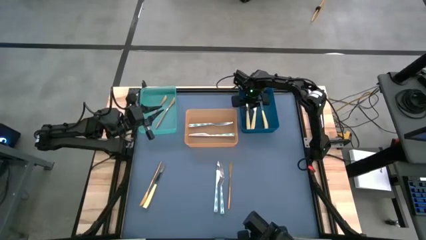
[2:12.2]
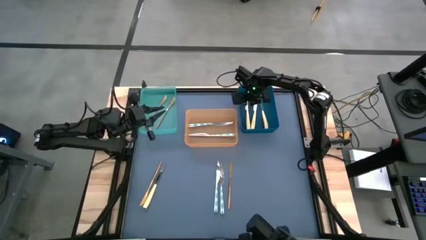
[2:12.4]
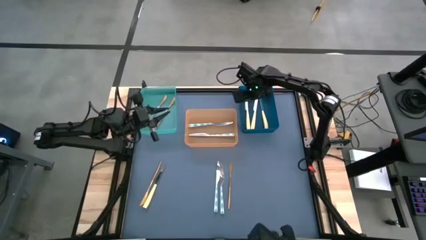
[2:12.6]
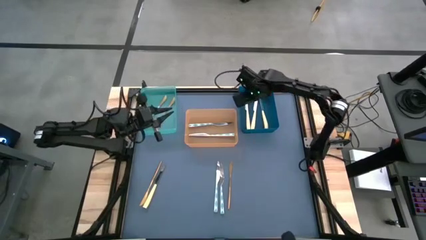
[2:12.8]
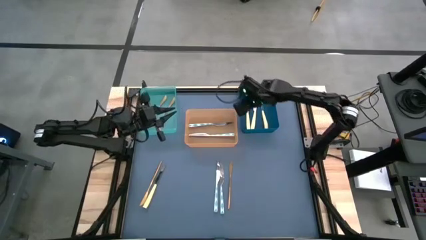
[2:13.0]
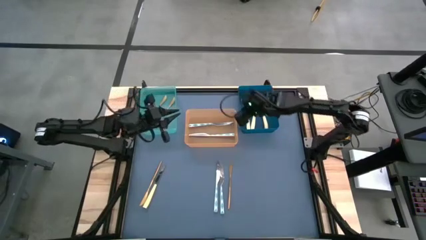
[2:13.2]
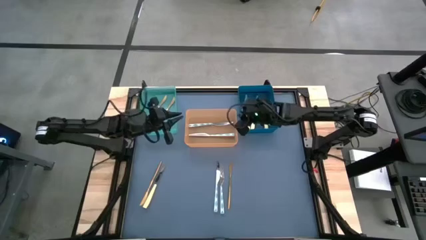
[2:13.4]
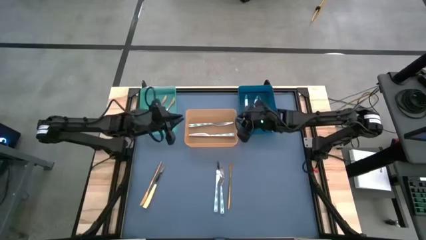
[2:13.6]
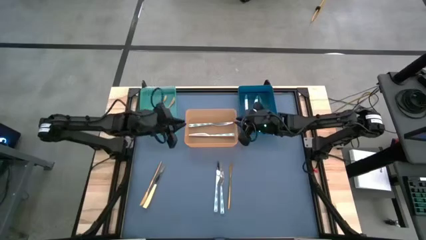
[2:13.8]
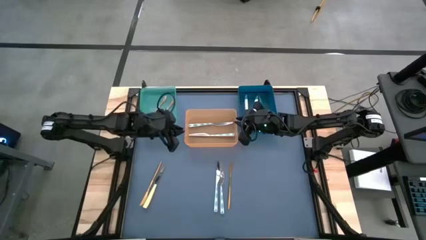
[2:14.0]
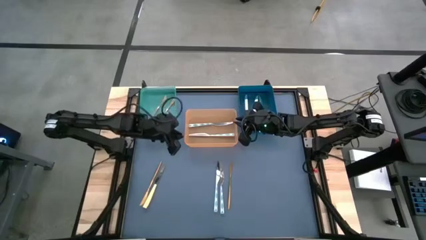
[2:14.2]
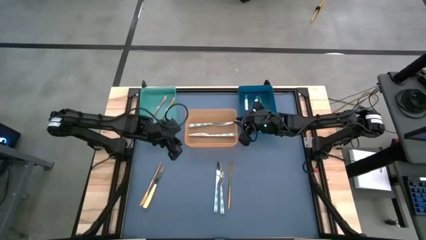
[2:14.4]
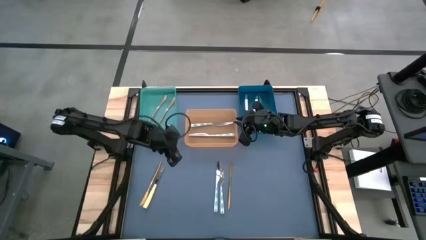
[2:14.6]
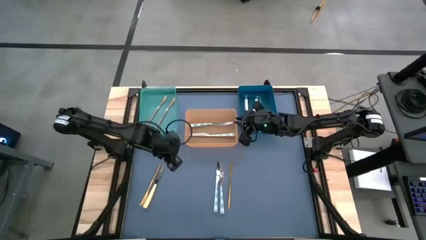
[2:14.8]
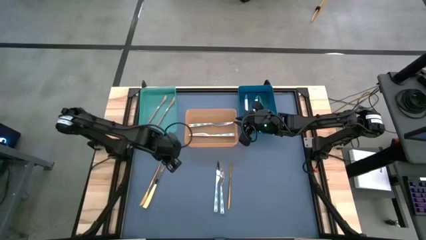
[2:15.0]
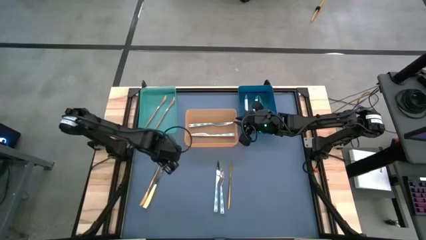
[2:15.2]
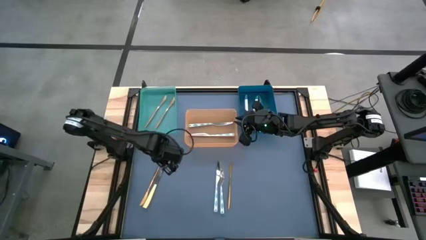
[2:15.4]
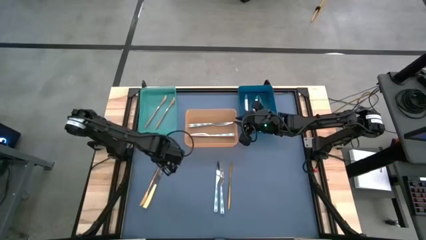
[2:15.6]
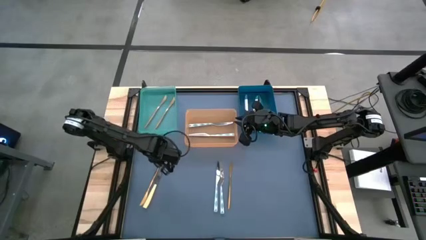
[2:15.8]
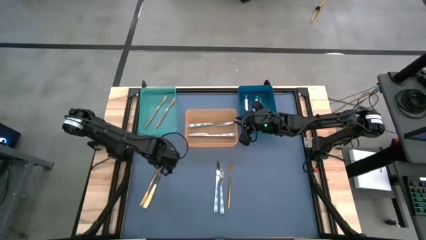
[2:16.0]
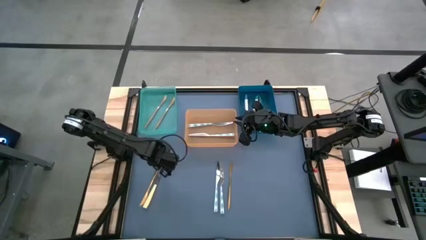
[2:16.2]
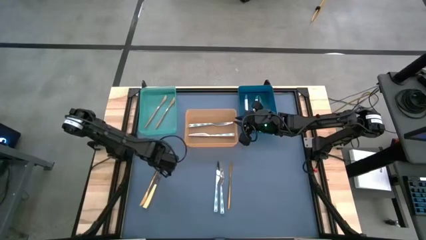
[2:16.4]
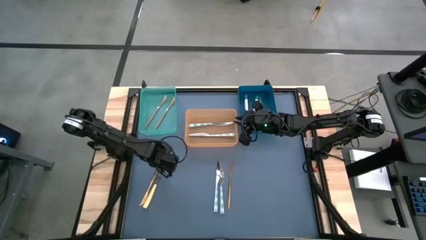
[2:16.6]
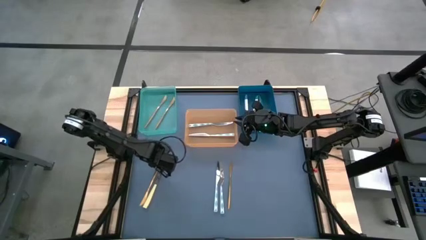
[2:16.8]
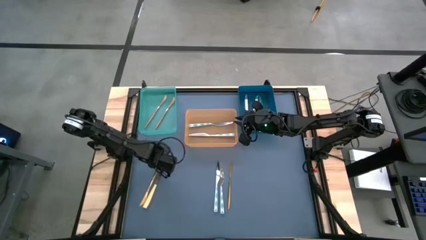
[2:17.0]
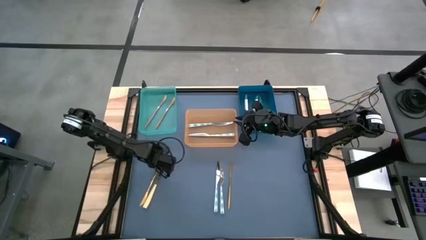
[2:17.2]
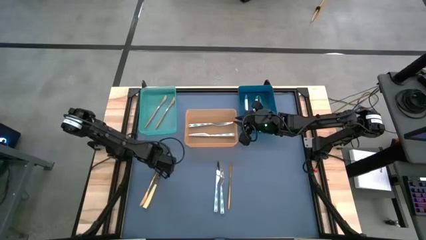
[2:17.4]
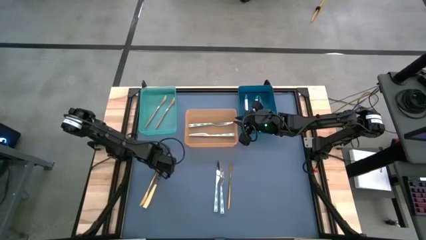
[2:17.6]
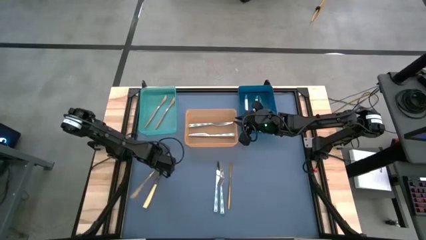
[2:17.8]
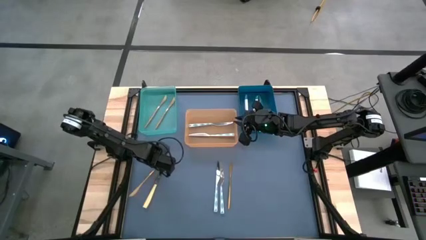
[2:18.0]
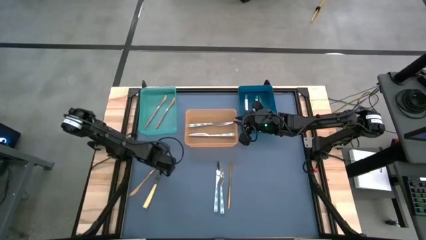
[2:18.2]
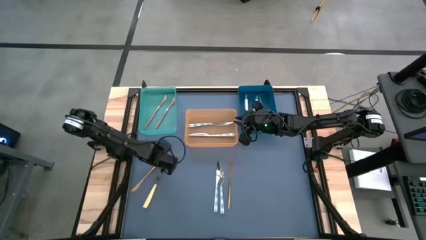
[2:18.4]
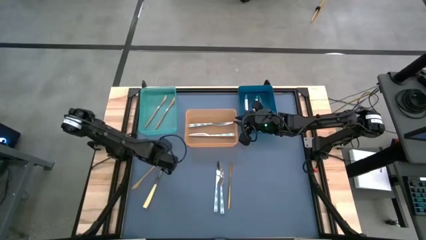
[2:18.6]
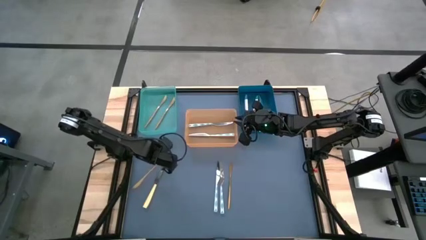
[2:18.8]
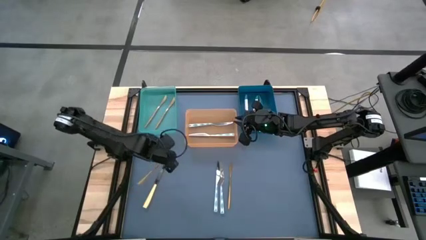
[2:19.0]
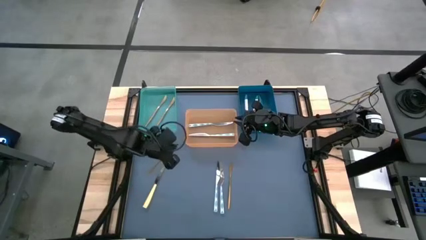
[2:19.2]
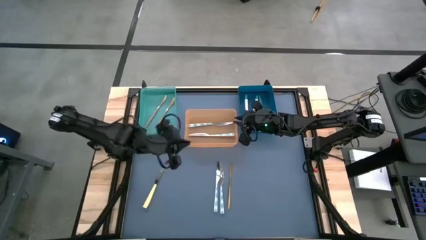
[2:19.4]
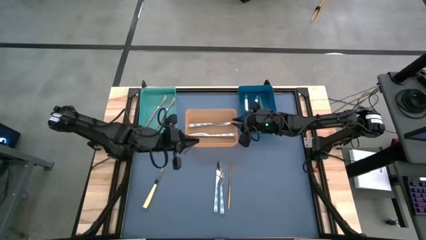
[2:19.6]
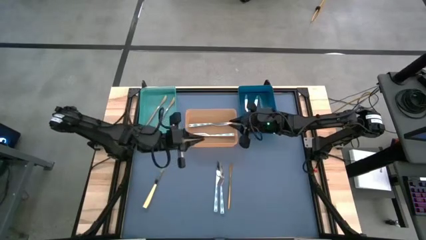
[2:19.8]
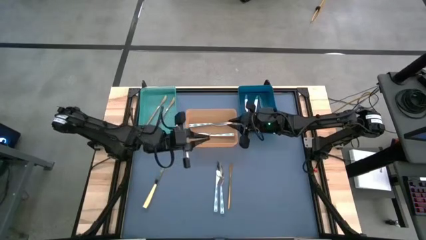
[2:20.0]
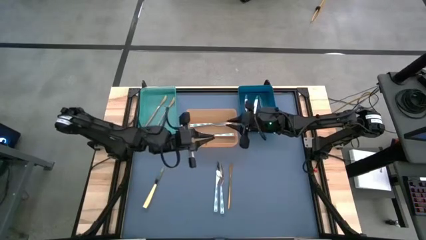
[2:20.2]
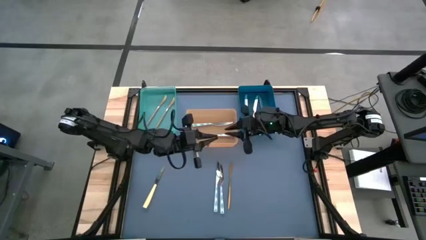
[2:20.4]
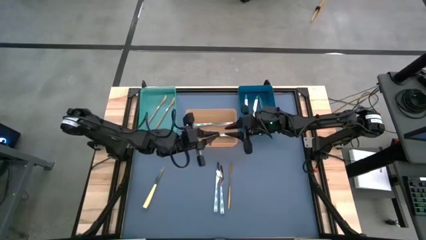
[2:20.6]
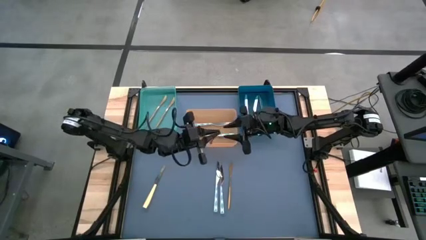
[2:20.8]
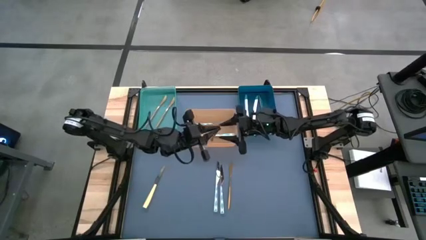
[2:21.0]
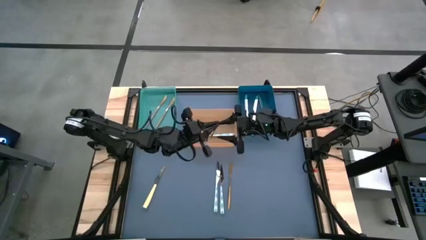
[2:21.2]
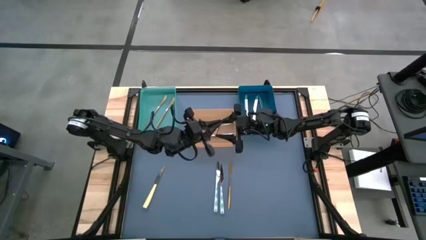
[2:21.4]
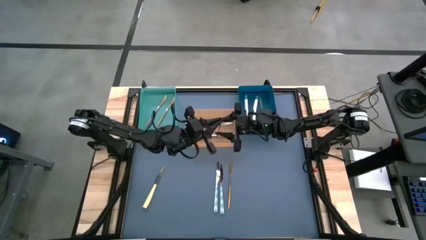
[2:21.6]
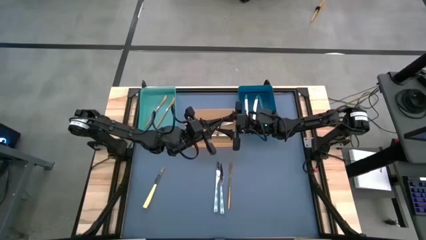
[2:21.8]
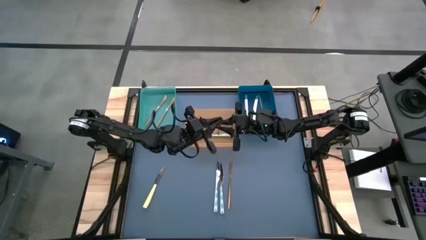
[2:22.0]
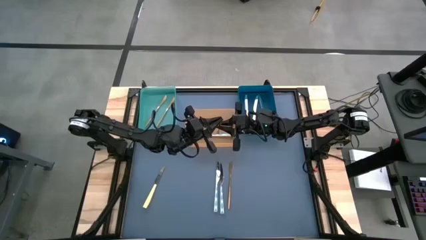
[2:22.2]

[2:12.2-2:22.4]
Task: Sort silverware by color (type)
Put the gold knife into the green bin

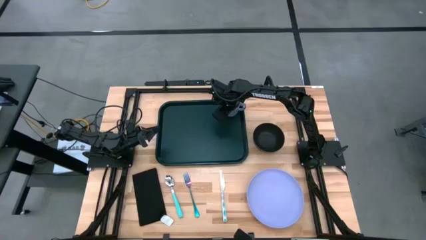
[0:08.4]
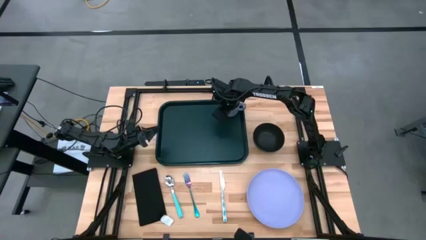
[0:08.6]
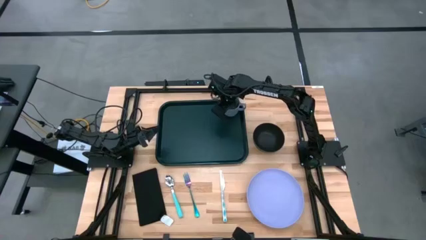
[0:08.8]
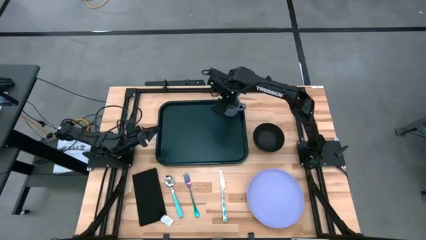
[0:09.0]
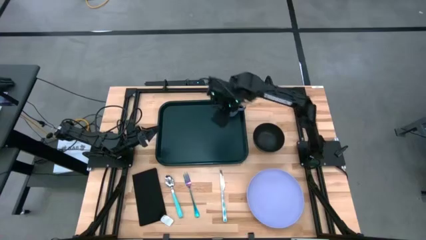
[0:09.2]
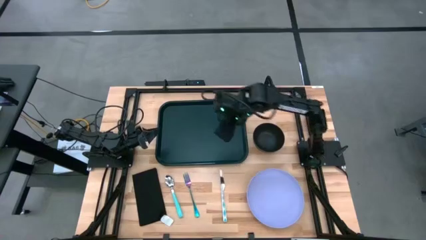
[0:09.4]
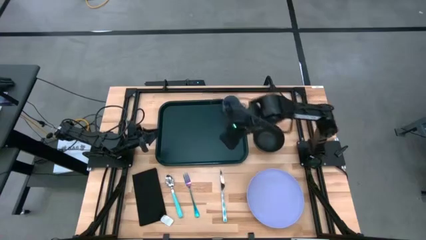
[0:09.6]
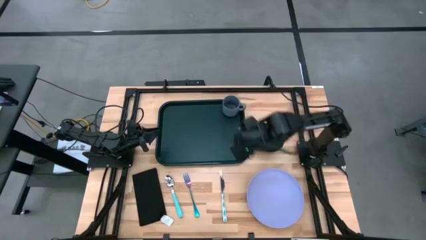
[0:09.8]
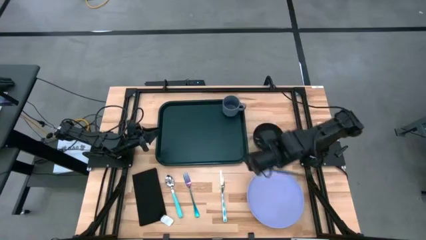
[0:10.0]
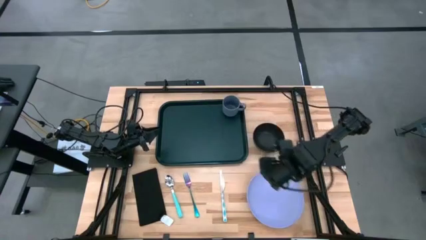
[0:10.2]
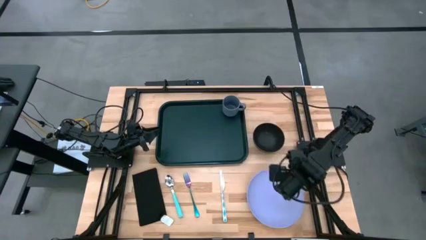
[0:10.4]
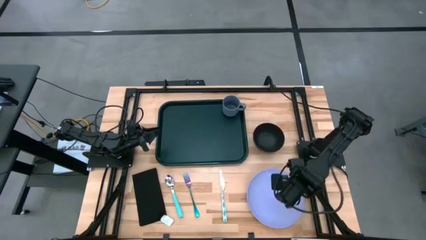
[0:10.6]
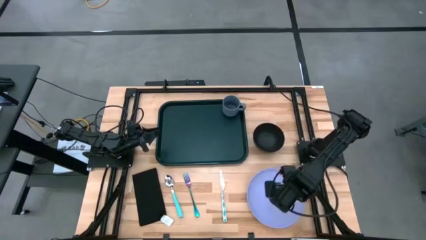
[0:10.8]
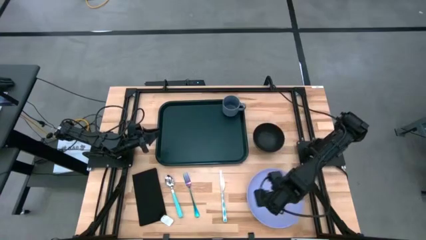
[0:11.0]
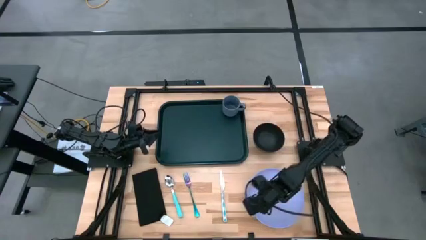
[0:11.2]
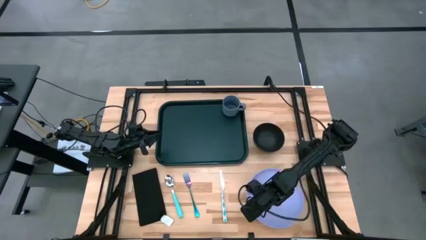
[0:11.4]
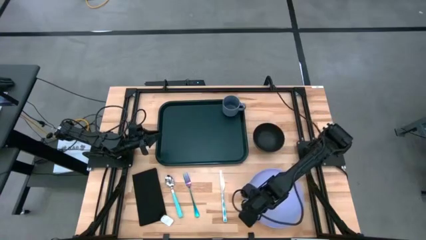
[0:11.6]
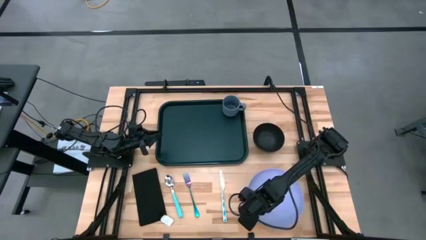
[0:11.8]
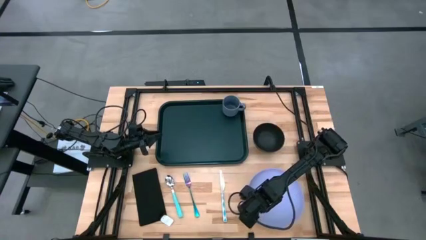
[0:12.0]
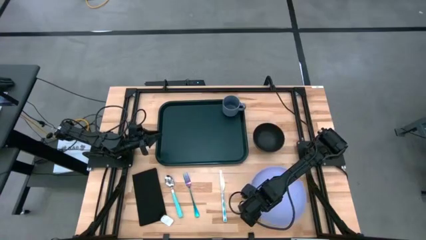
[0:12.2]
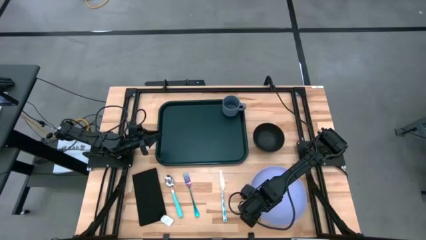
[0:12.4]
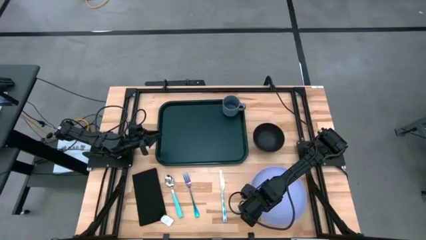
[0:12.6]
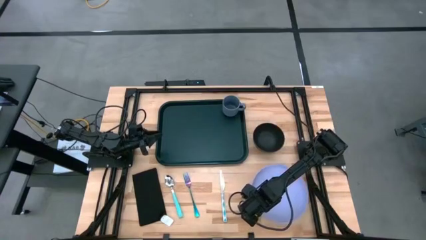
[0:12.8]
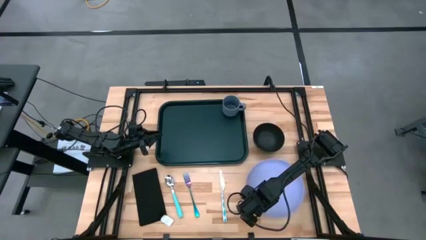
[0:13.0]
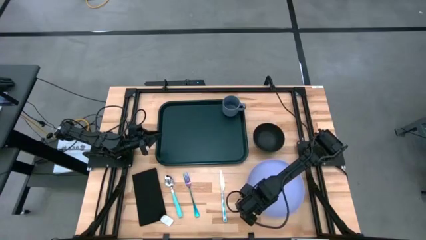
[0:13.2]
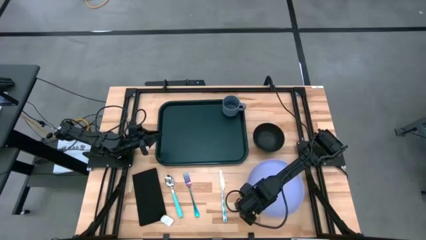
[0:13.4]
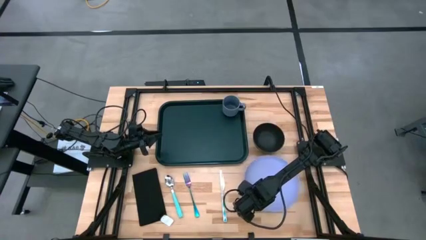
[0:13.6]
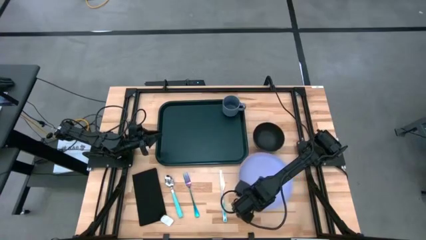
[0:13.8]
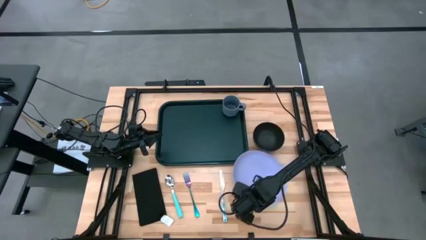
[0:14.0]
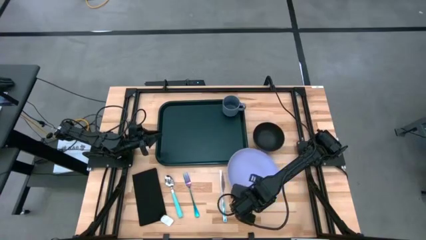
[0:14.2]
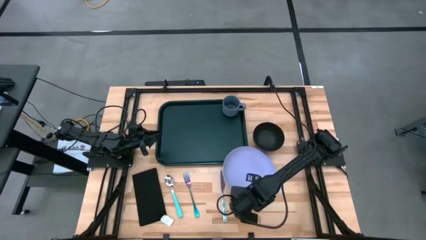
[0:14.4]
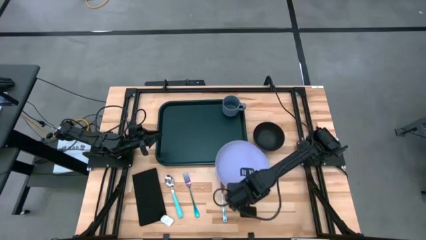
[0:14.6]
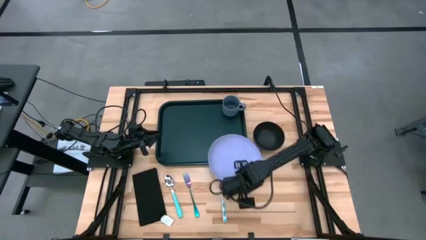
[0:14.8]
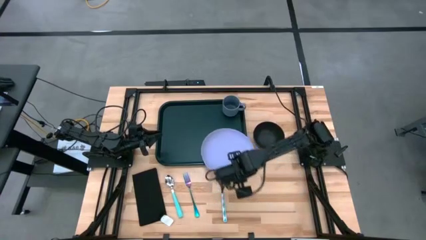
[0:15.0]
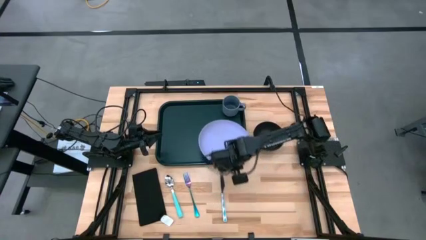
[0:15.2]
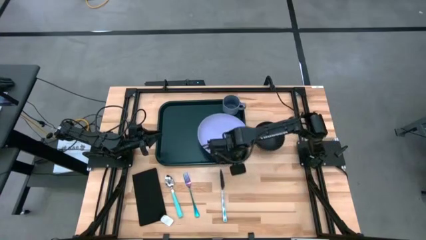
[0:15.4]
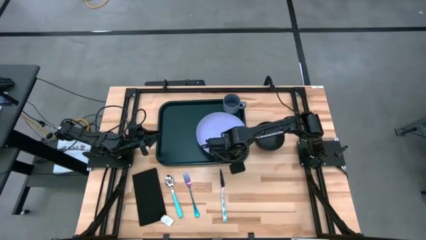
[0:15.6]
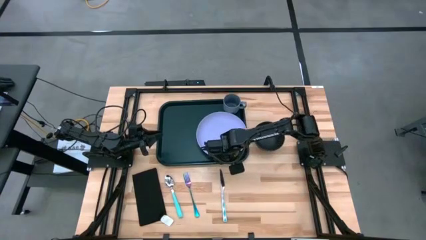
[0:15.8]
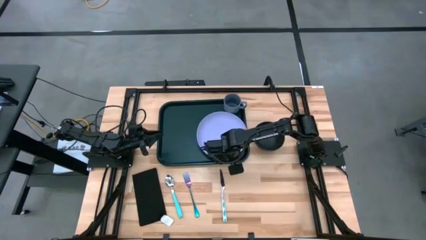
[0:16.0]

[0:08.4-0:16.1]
Task: Set up tray
Put the purple plate on the black serving tray below the gray mug
